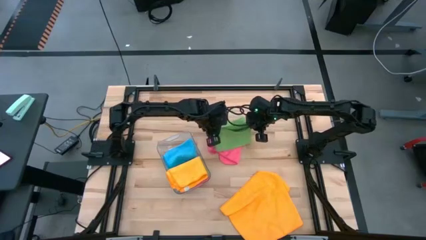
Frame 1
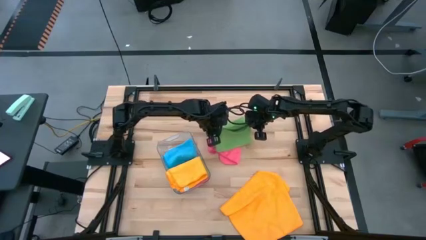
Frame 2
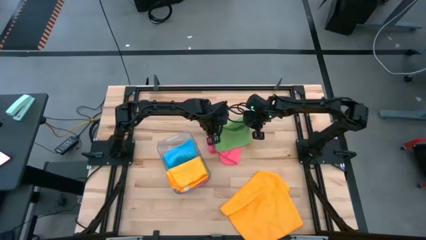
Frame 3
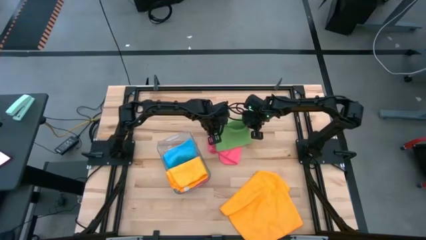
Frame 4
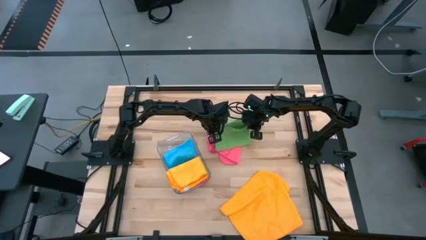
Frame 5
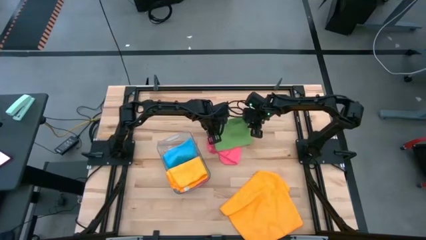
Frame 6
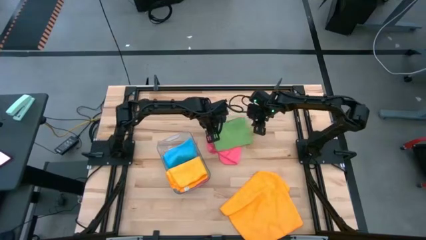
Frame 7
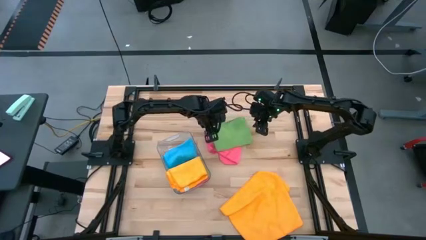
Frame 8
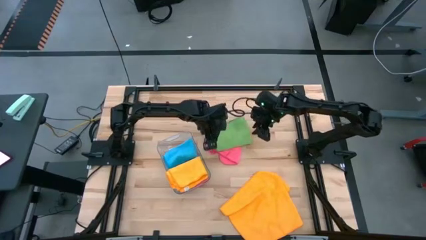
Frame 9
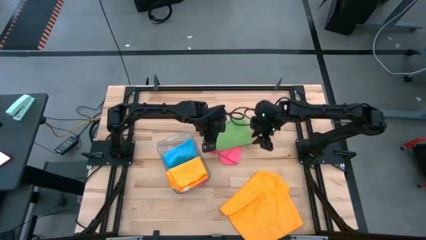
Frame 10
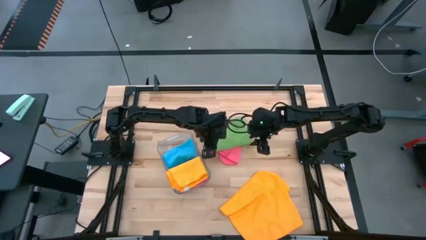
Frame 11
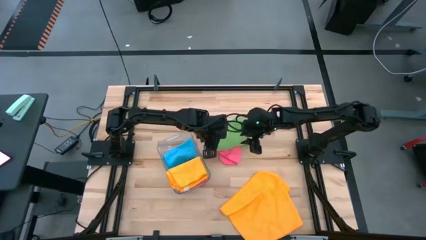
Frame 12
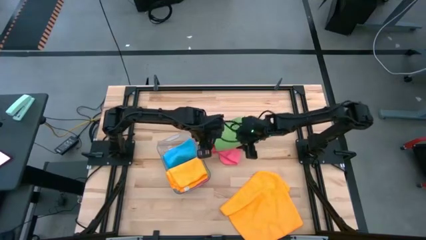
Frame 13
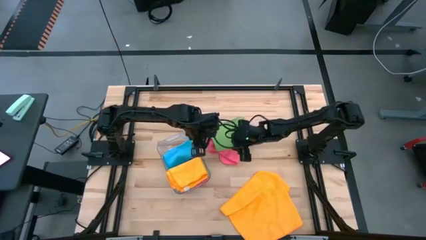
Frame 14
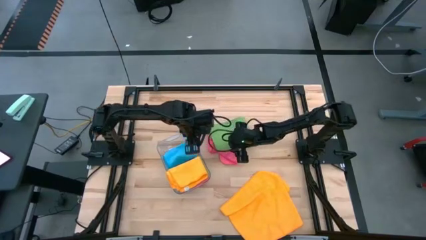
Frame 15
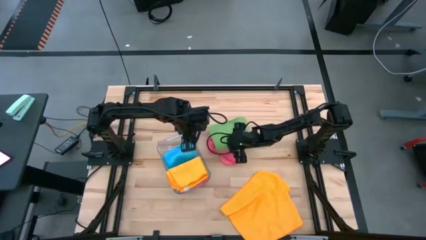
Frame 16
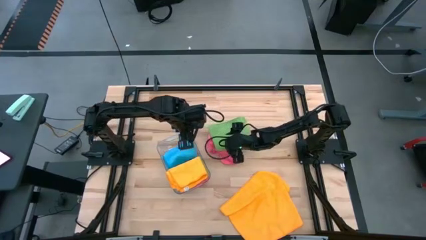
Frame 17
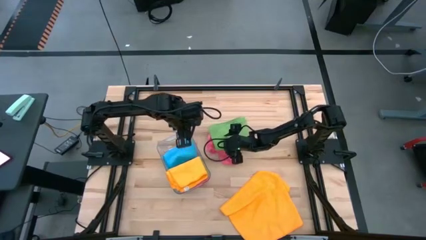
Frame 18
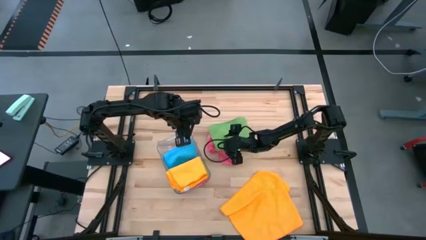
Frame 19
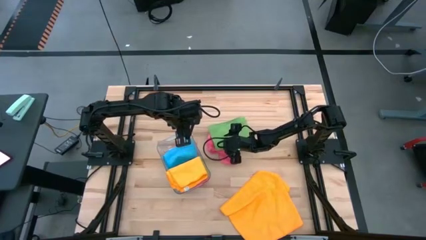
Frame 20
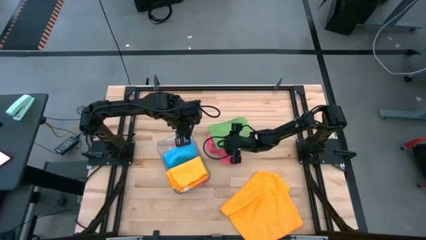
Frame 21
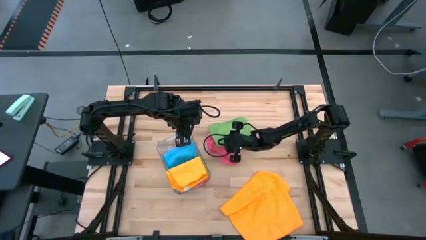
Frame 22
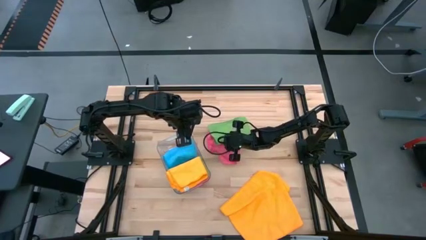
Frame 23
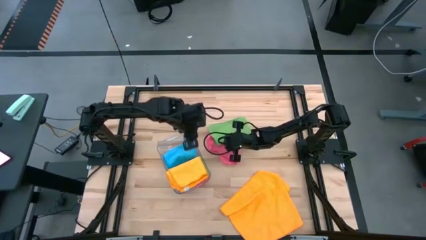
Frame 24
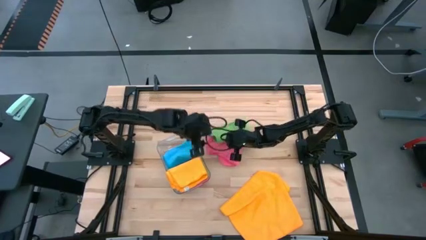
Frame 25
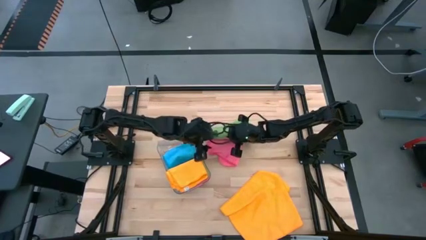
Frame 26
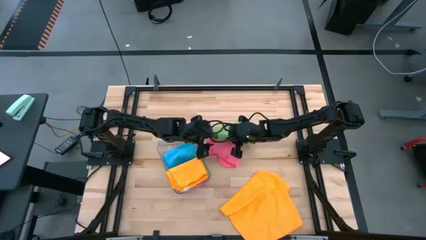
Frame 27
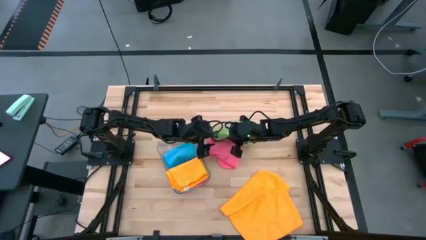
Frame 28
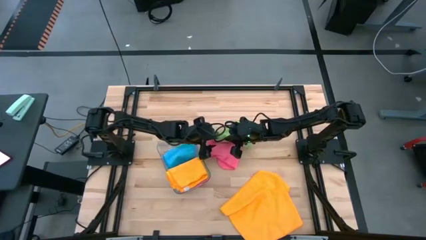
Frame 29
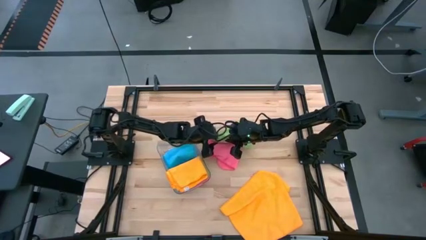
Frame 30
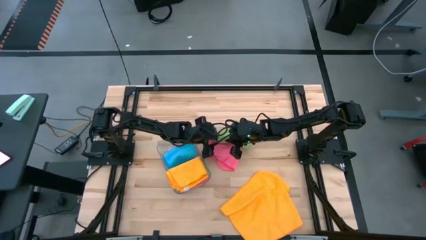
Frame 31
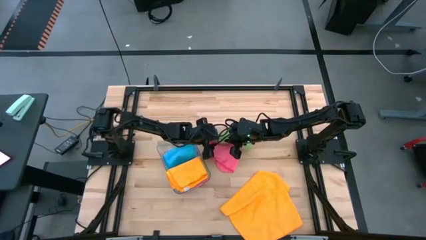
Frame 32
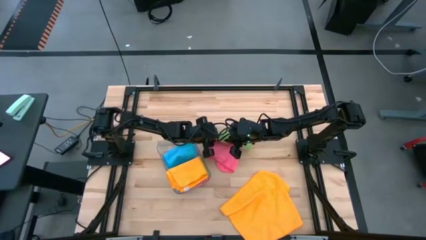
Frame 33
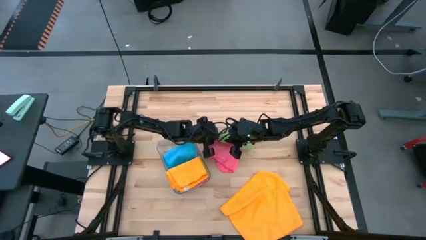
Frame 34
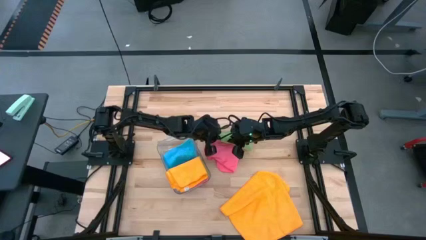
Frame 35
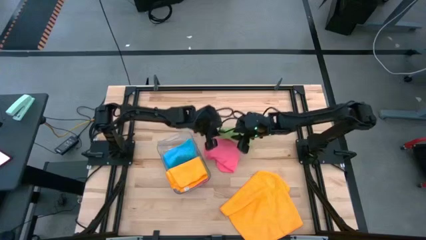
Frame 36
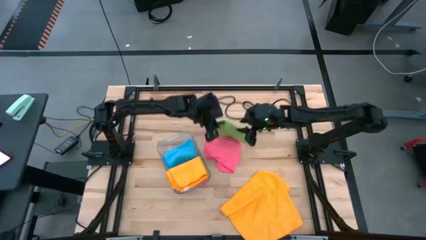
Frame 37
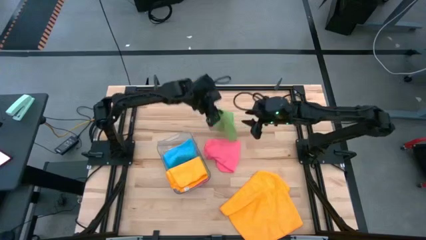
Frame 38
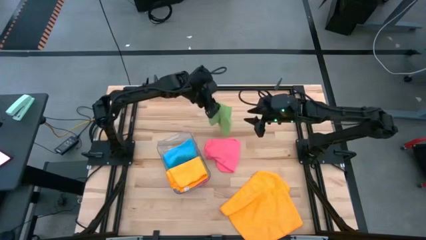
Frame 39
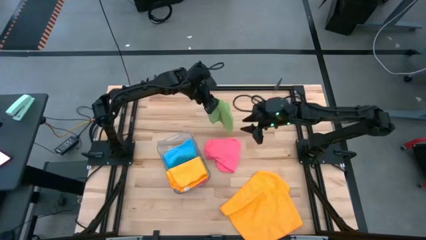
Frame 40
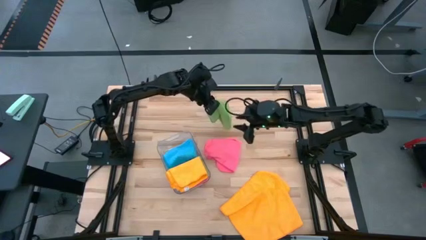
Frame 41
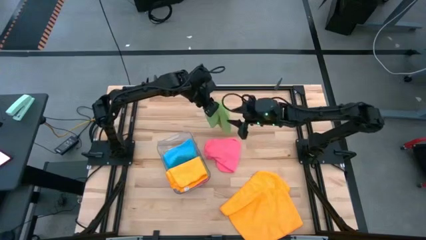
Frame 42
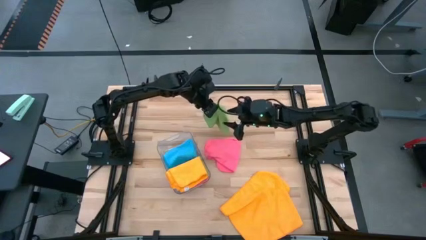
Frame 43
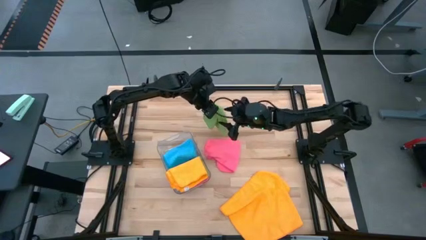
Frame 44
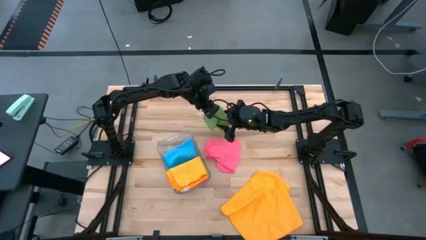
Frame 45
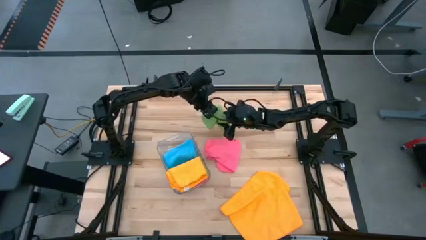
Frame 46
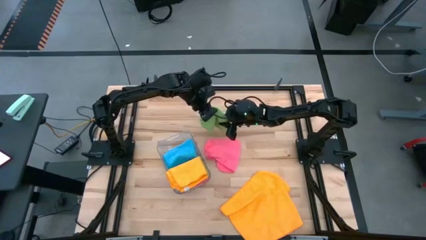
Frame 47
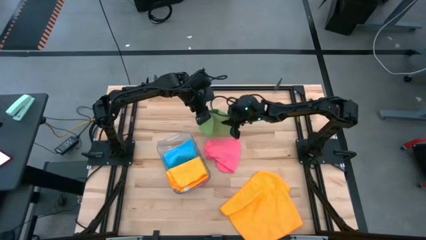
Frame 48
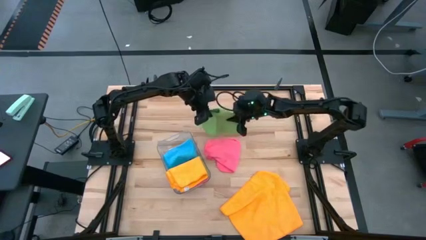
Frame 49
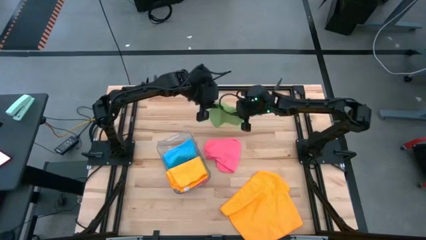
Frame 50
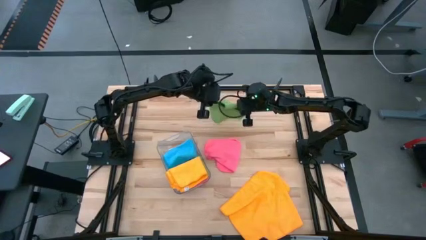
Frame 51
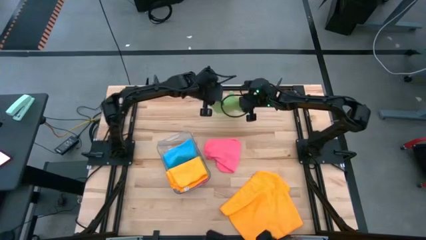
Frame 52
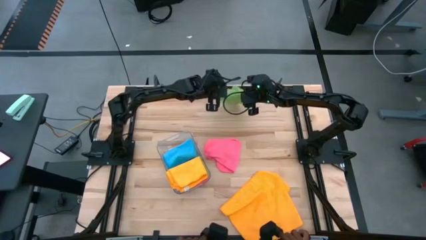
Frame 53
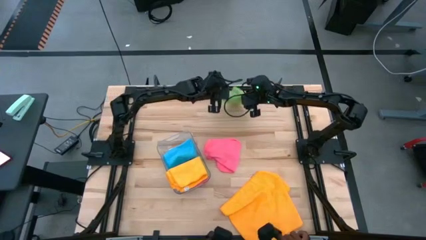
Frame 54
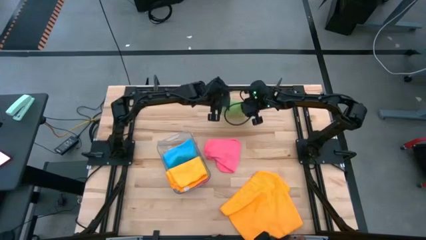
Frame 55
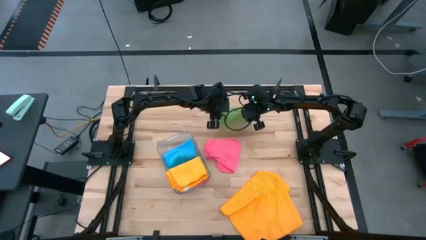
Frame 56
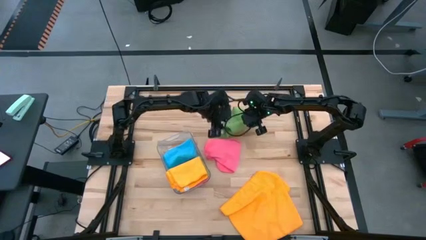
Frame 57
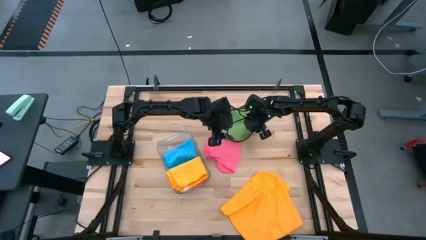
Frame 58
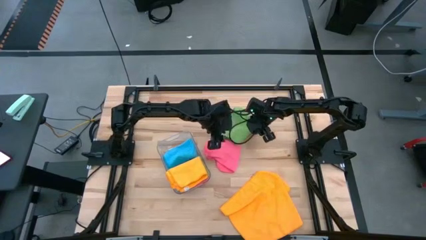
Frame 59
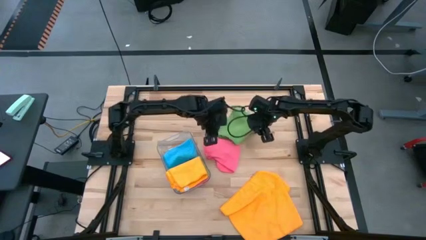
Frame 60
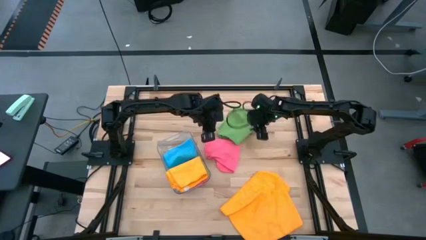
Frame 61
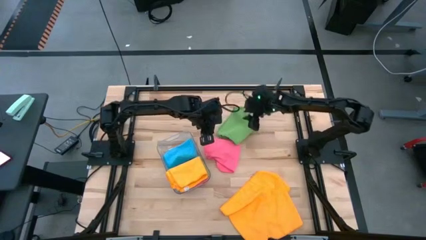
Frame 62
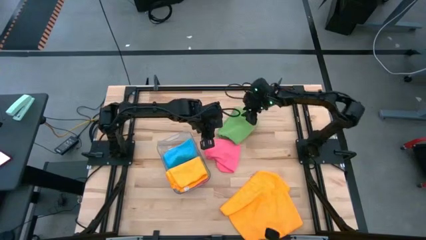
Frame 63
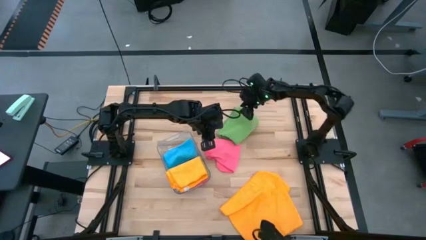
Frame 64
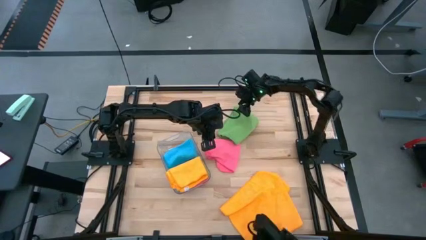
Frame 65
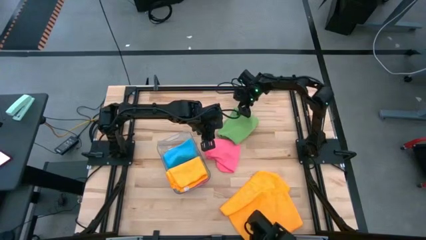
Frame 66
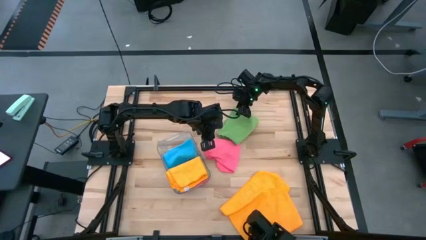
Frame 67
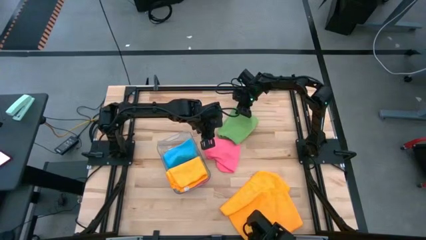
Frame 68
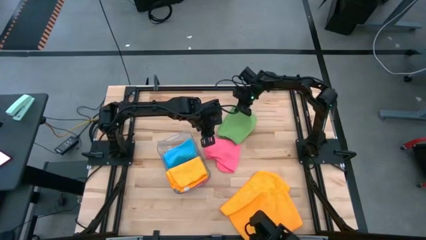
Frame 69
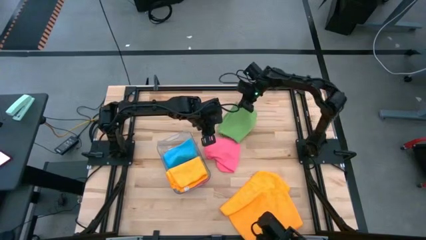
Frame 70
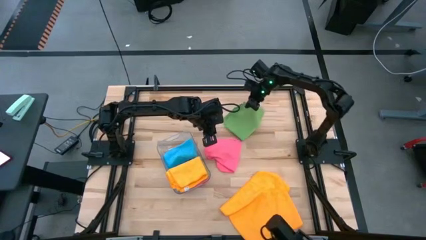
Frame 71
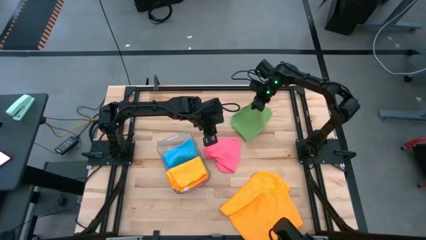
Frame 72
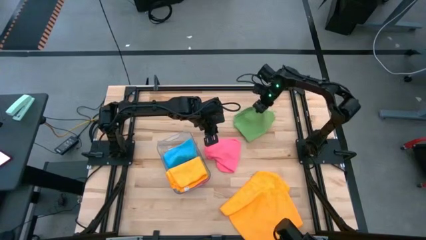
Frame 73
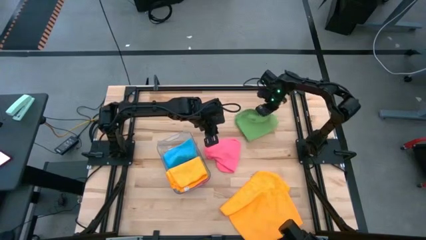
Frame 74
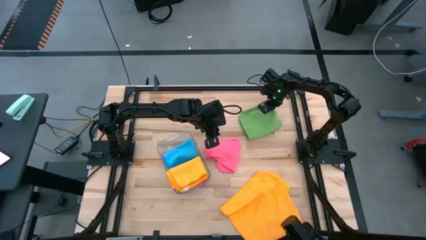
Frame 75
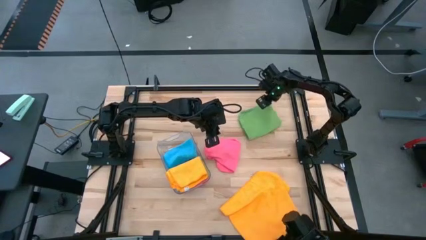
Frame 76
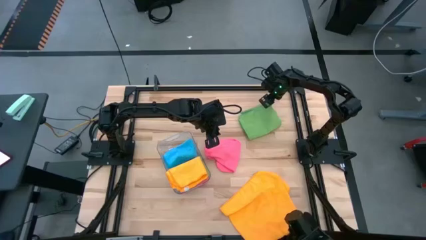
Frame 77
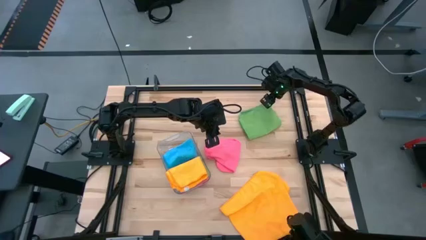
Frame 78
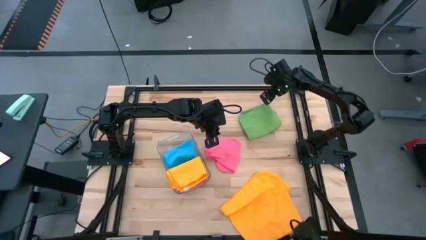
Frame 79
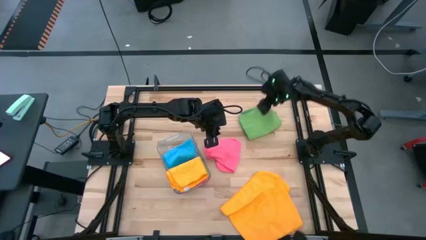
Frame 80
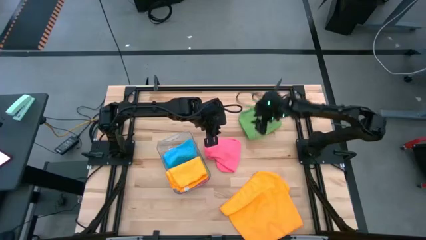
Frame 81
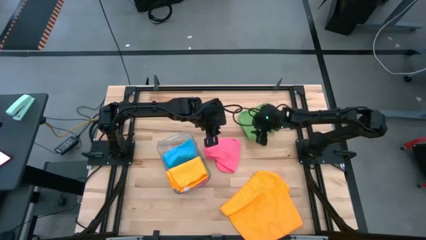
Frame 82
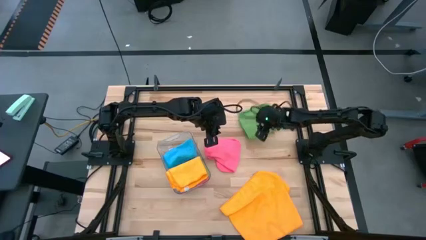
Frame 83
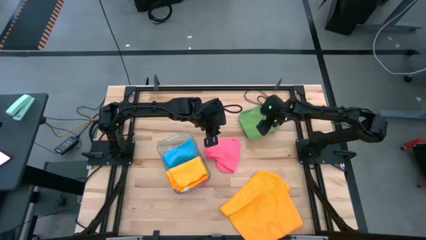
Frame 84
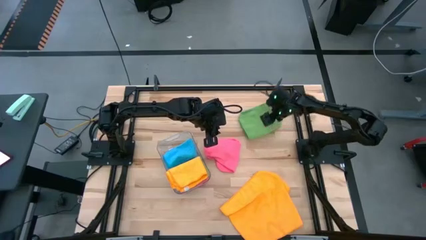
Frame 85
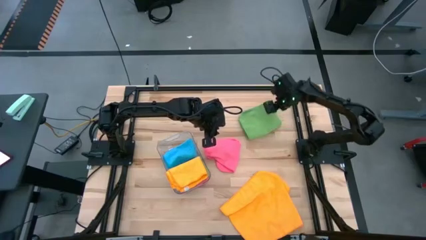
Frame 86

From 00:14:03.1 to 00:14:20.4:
Task: Fold microfiber towels
Fold the green towel
